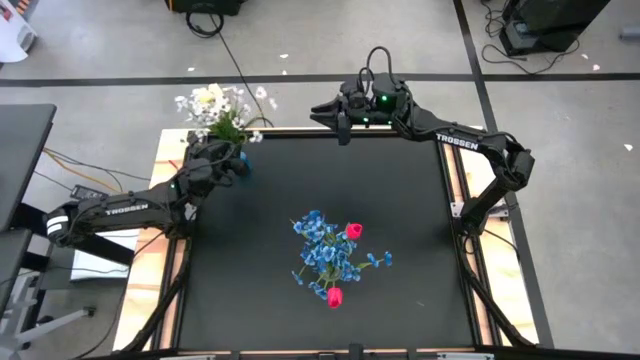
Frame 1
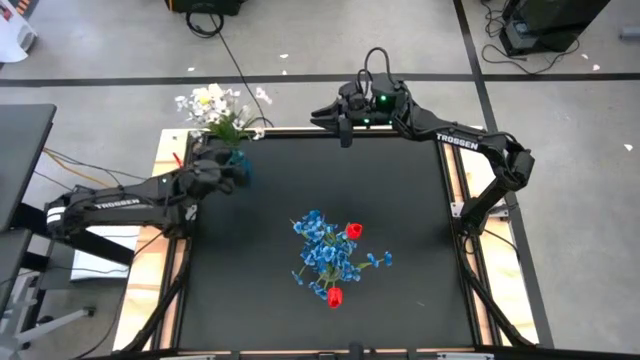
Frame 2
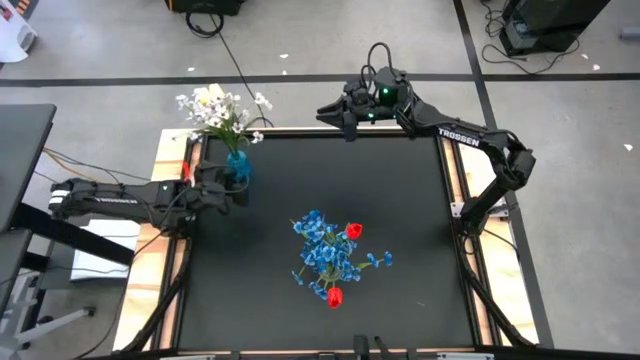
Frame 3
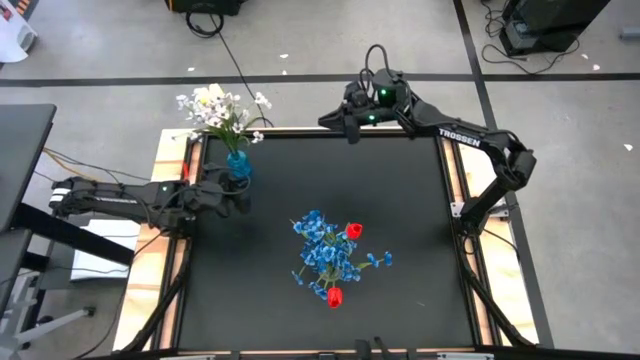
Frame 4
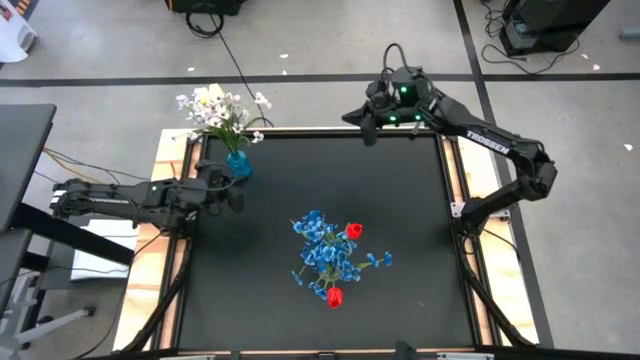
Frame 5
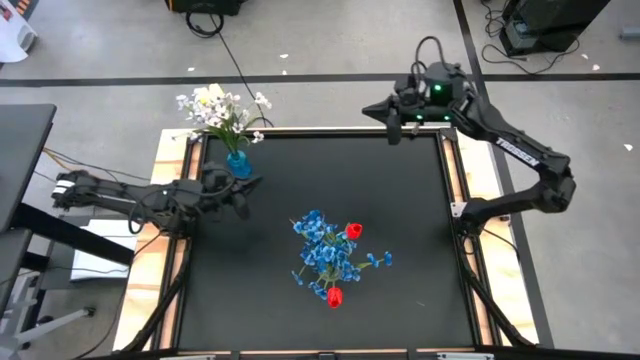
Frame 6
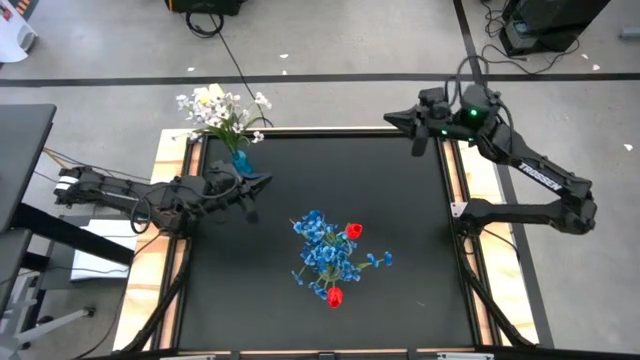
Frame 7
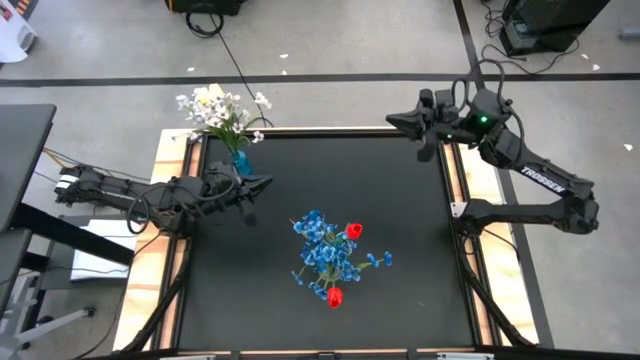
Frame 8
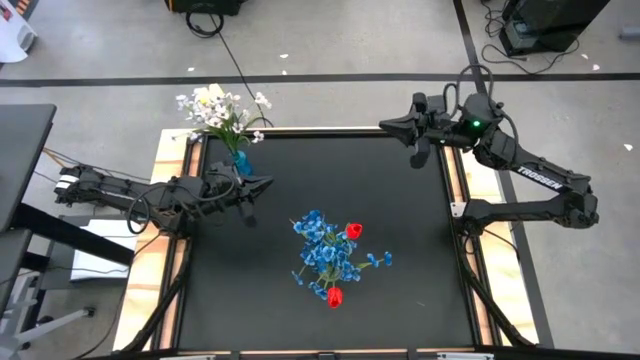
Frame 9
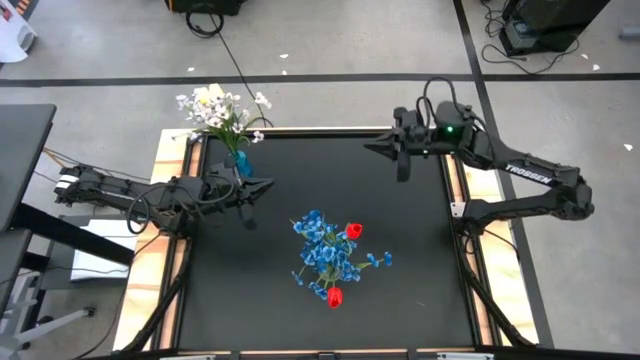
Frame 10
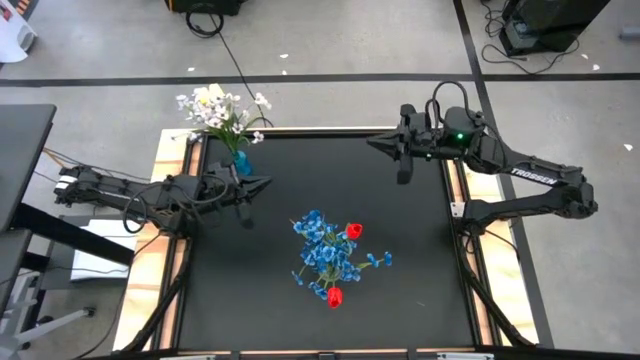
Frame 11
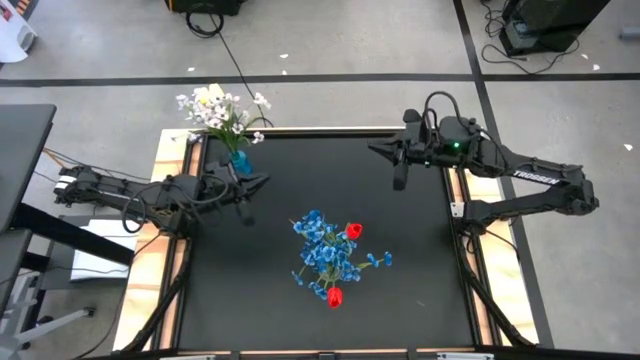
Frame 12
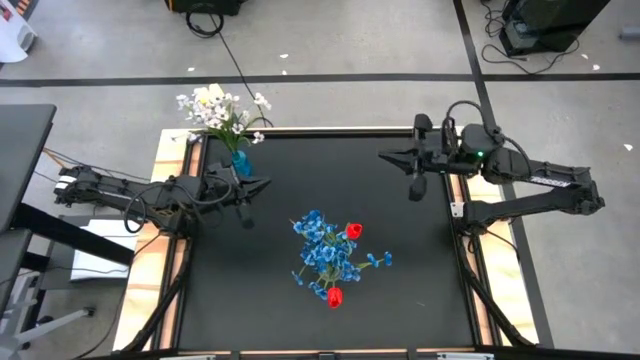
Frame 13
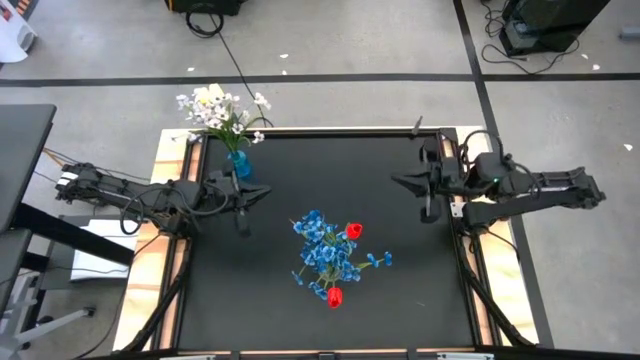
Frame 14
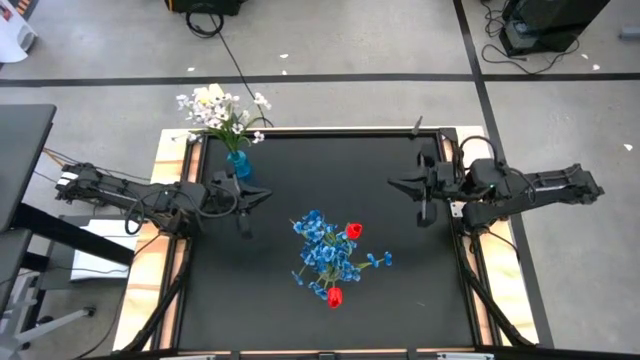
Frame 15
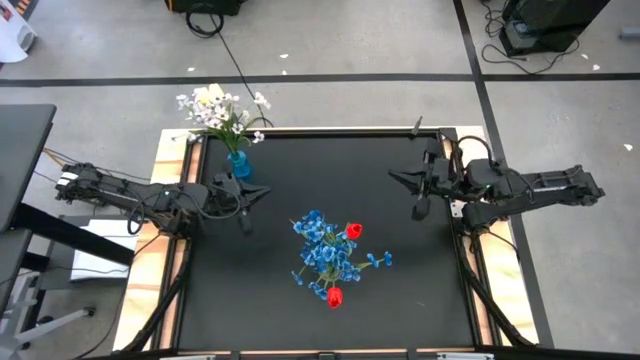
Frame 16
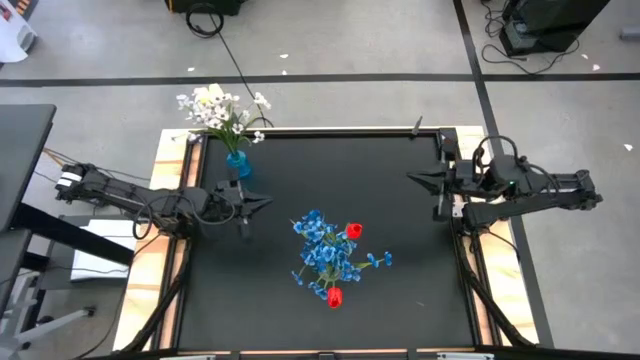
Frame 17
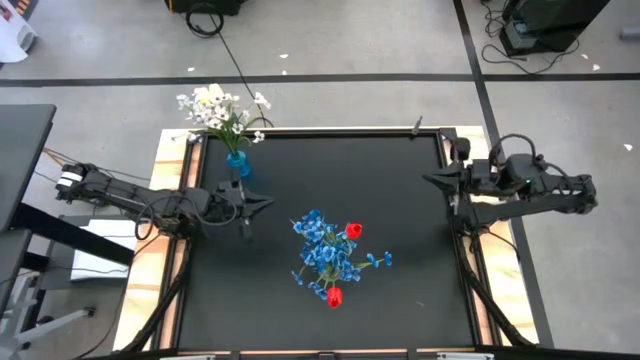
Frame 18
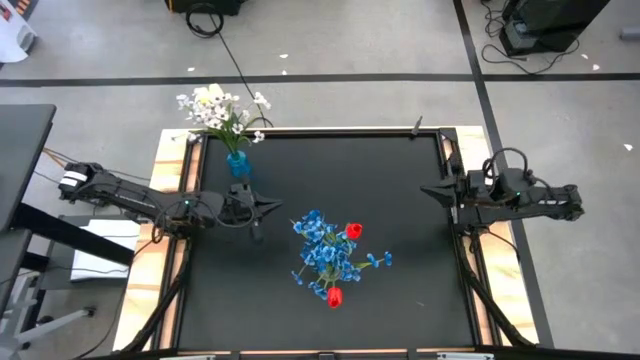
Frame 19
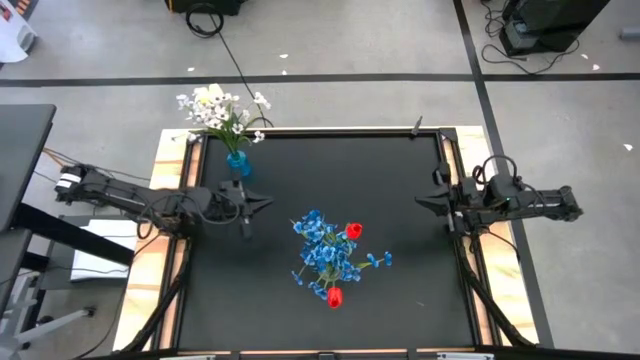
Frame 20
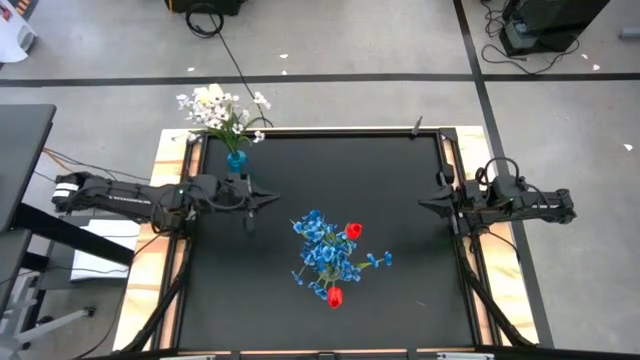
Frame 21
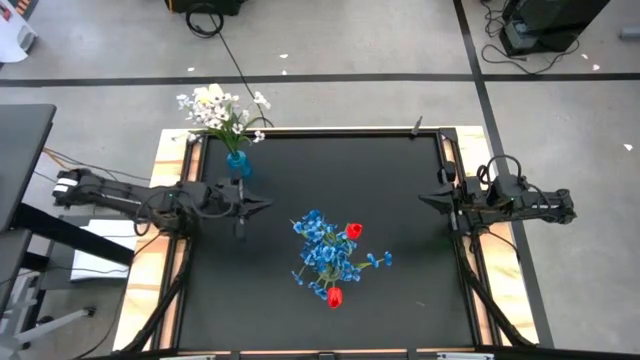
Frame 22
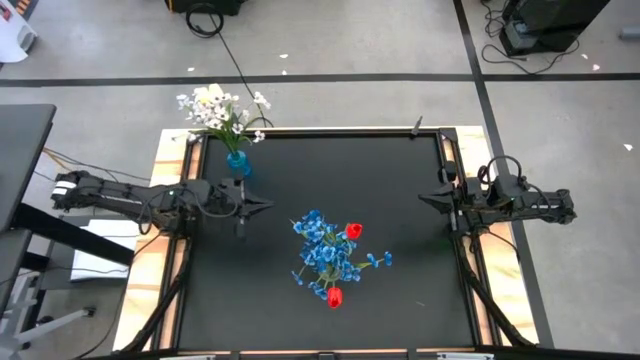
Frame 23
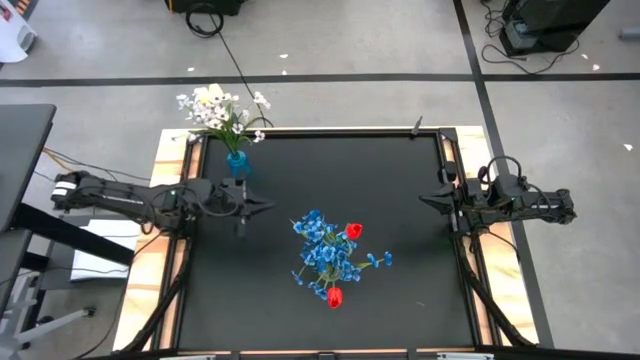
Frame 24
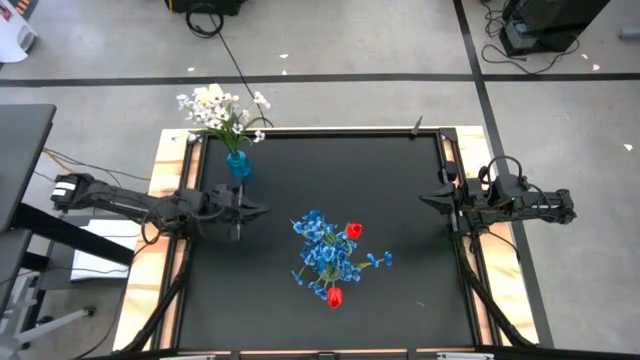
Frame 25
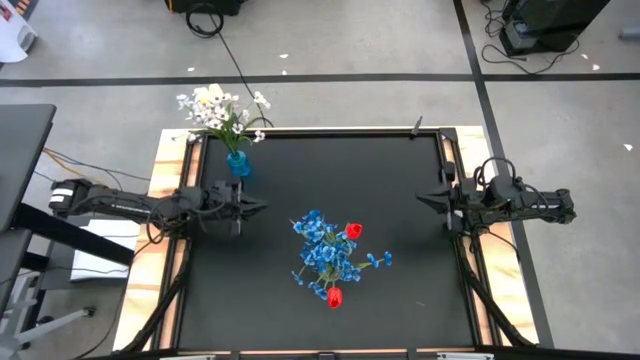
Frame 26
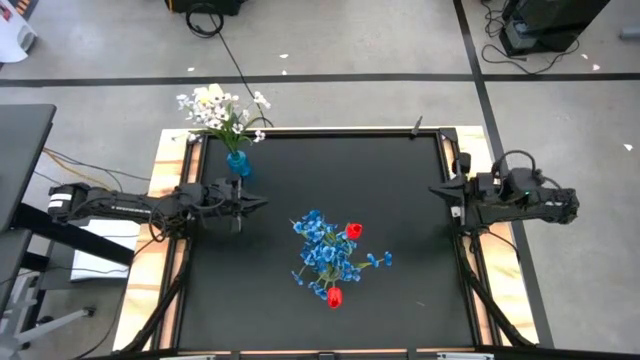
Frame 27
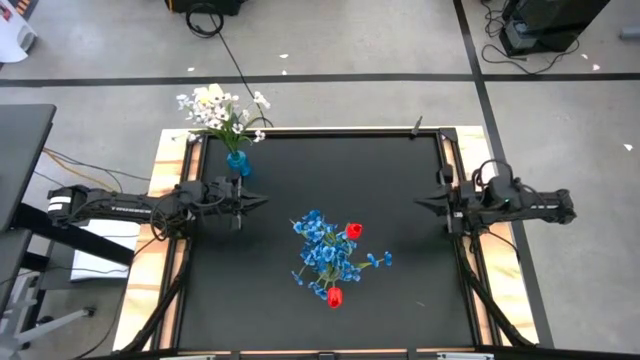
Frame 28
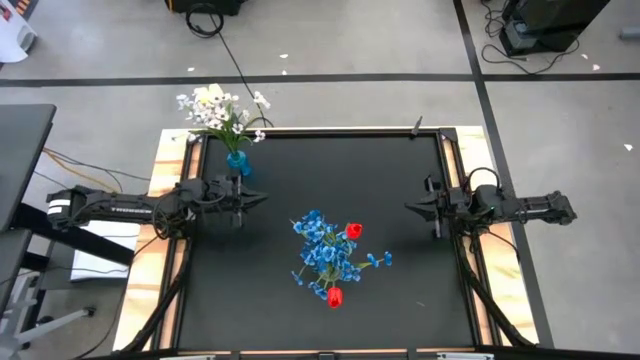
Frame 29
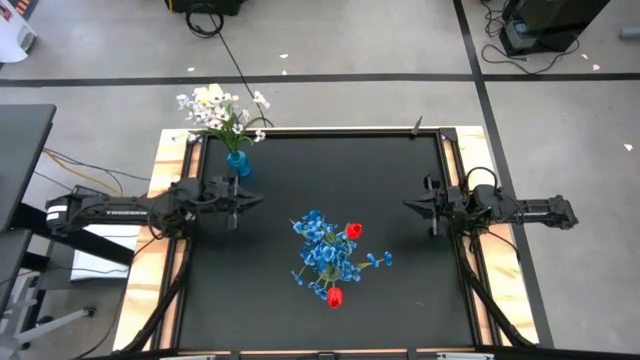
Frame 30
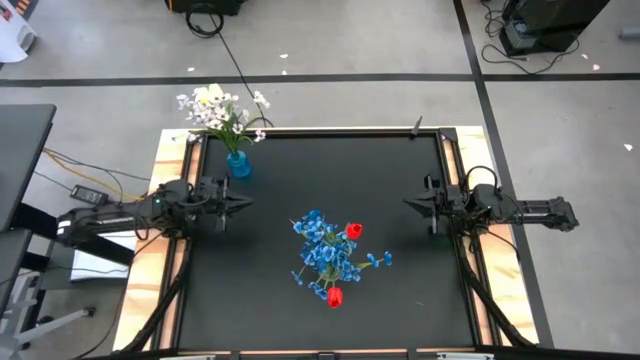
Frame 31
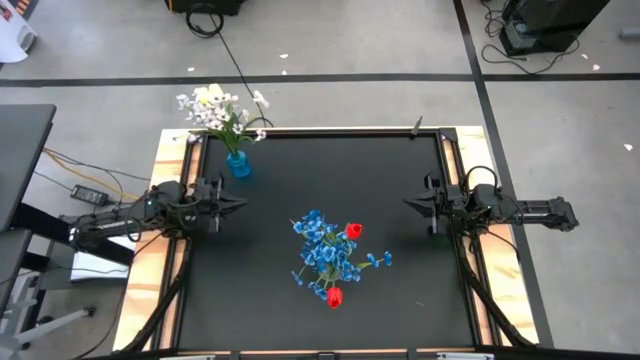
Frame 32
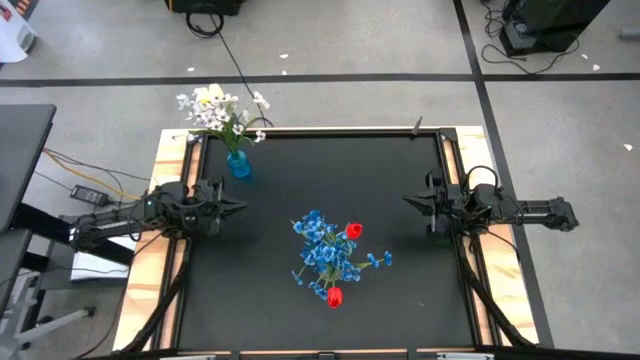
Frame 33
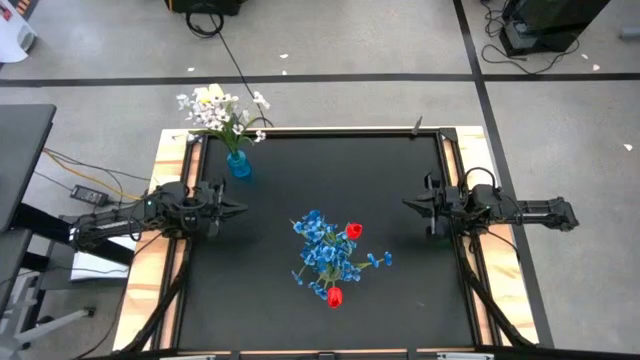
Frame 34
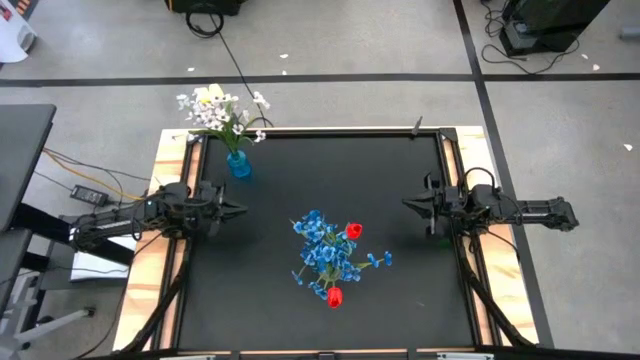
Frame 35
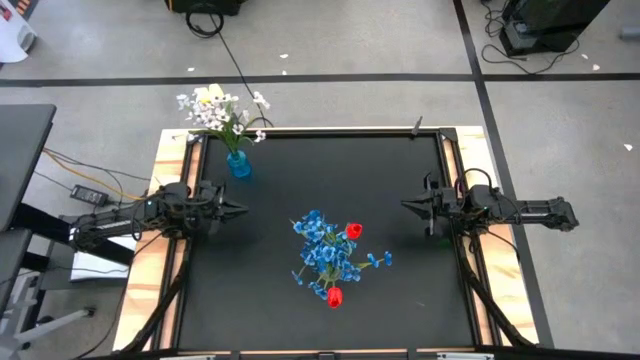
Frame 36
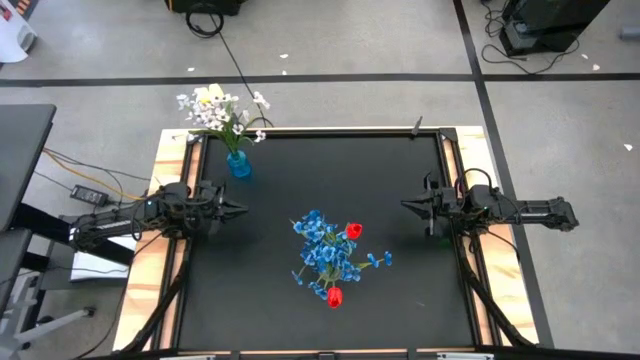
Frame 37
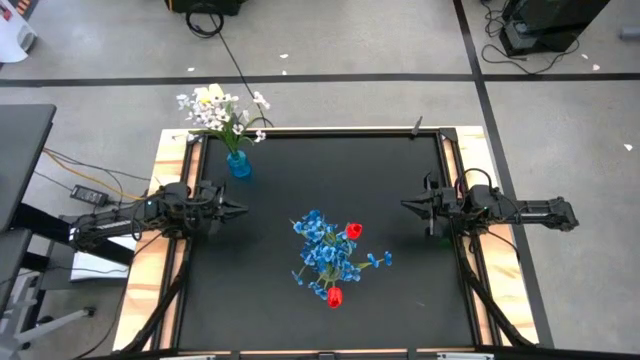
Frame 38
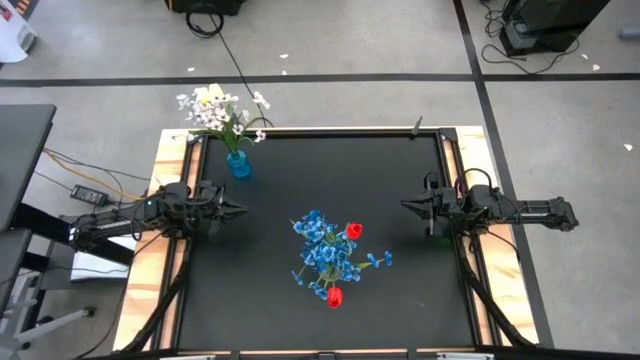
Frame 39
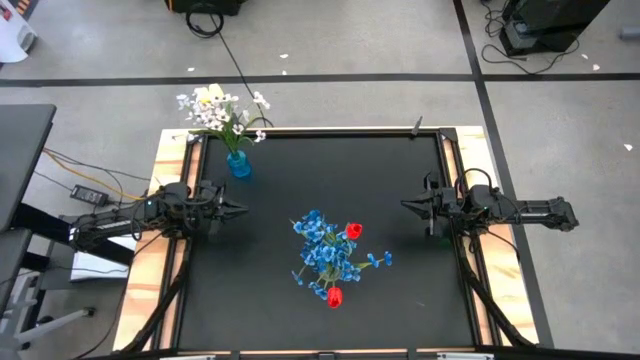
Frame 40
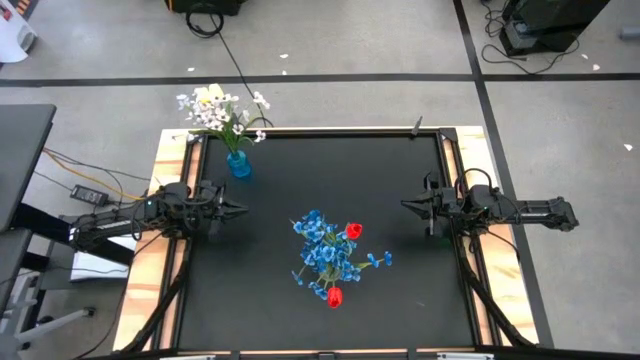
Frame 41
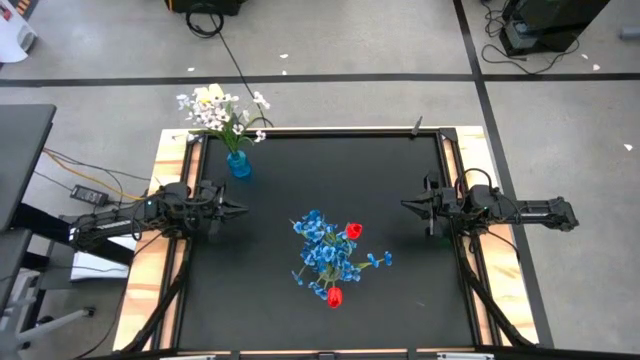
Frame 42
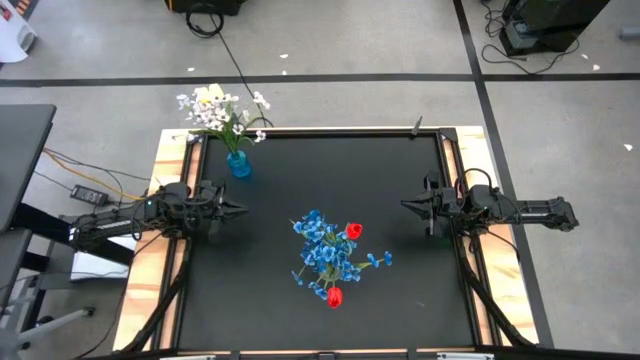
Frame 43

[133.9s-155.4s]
Task: Sort flowers into vase by color
Return to Home Position
